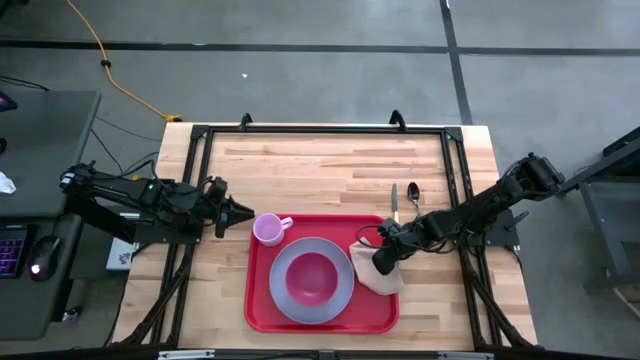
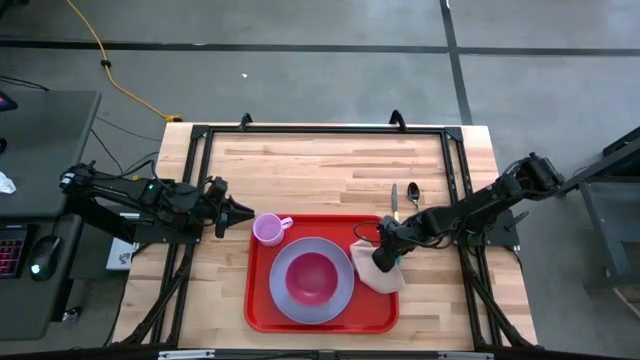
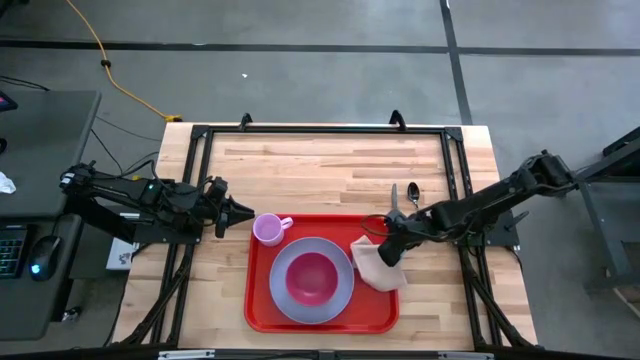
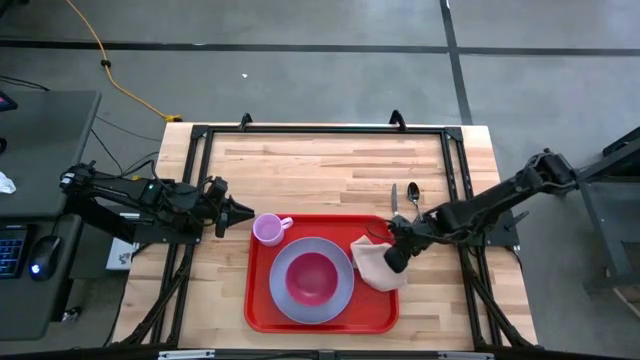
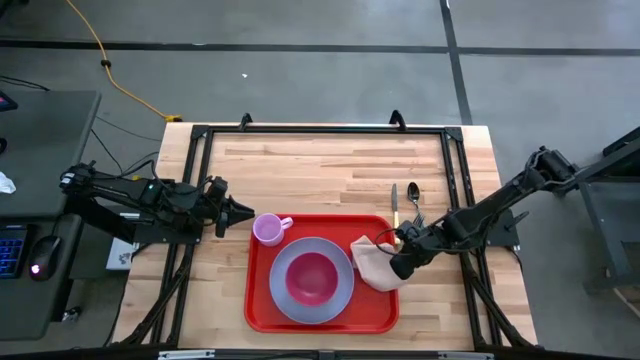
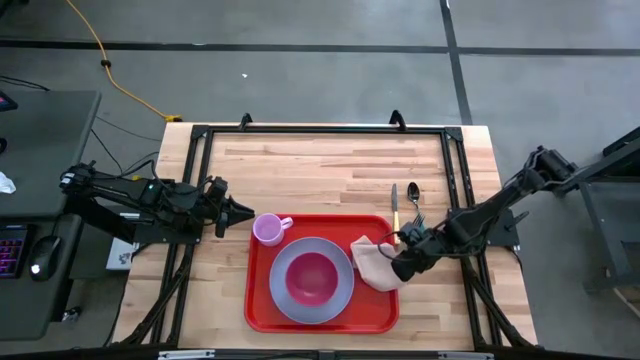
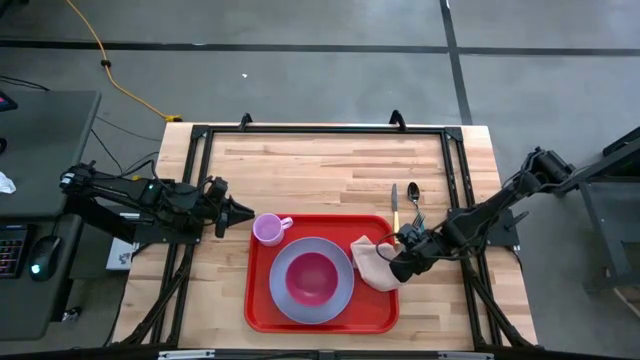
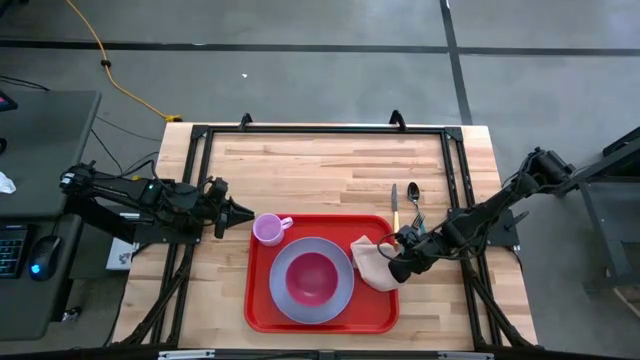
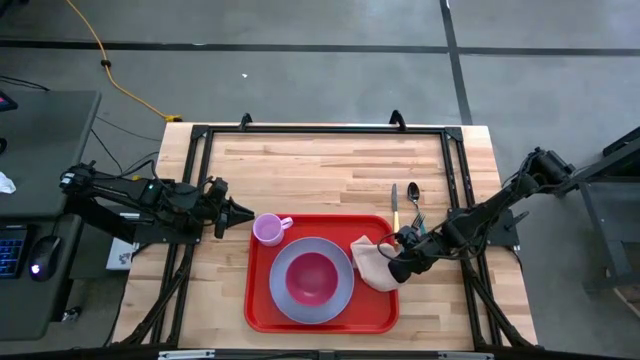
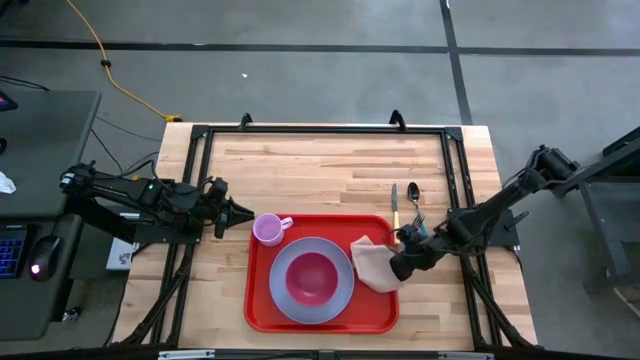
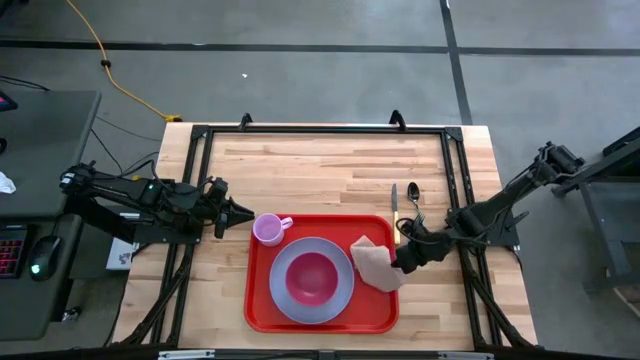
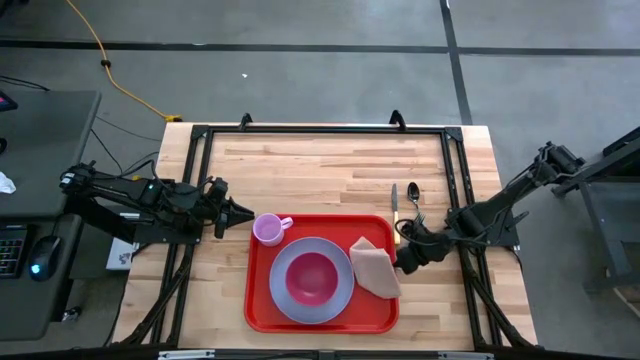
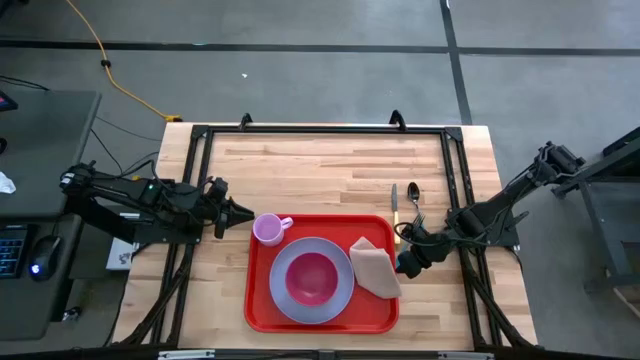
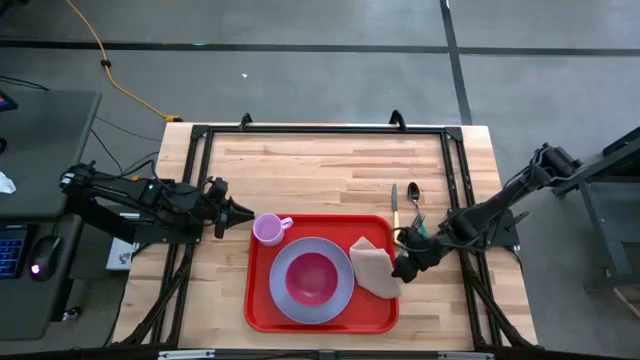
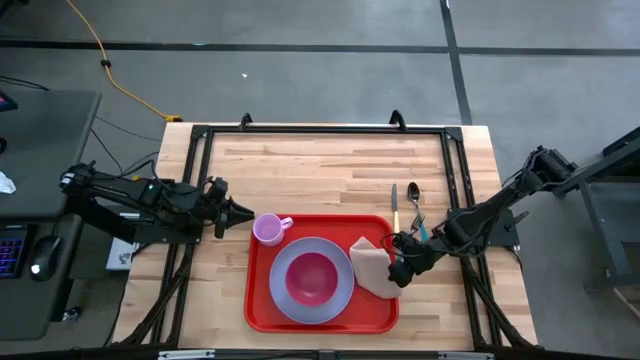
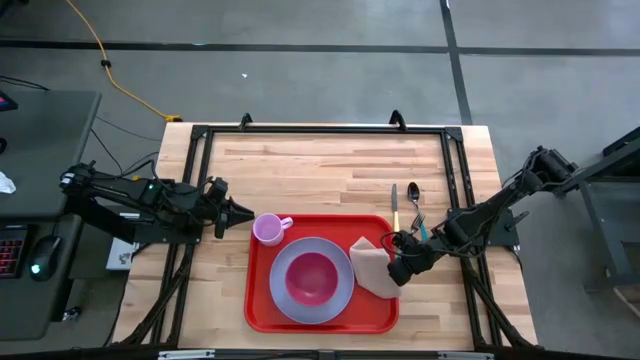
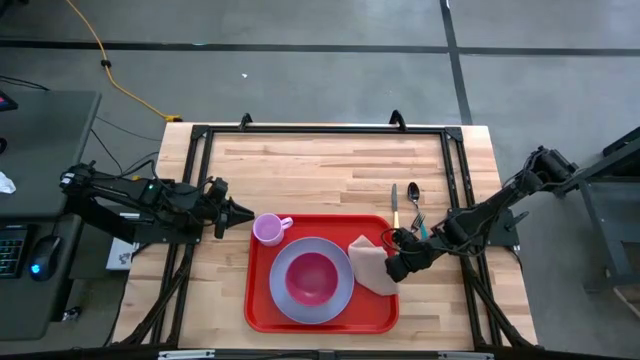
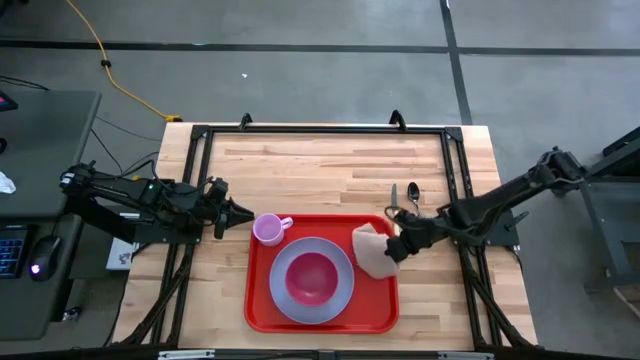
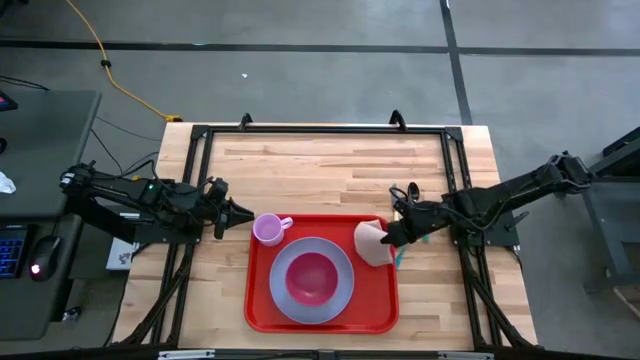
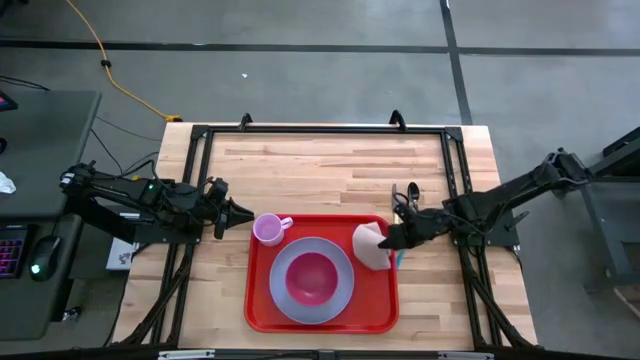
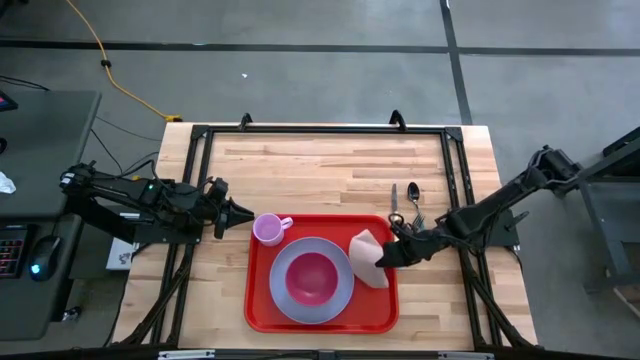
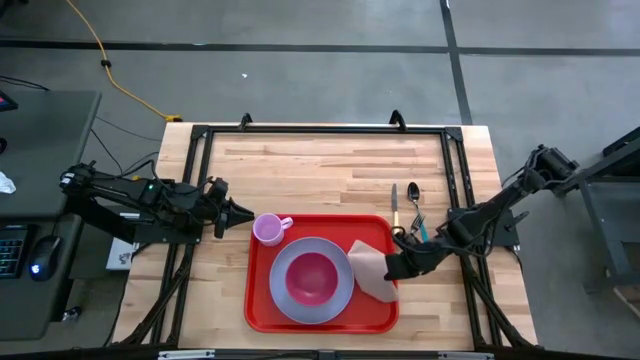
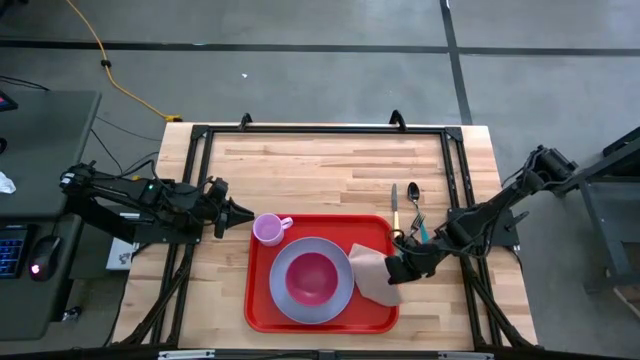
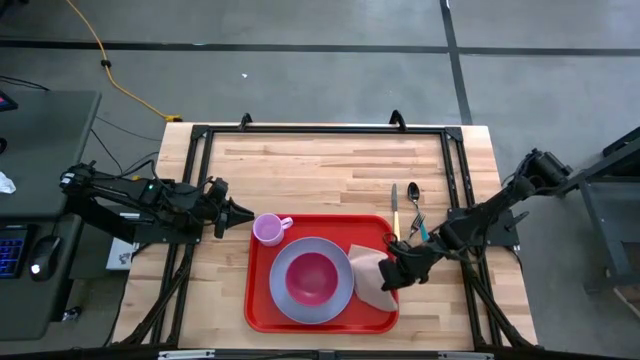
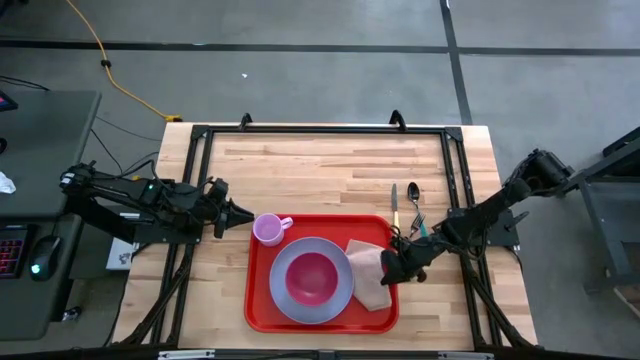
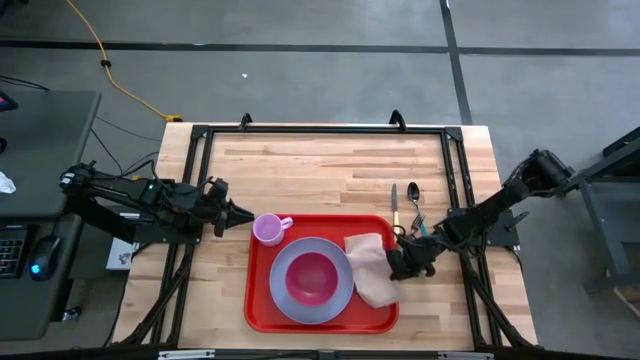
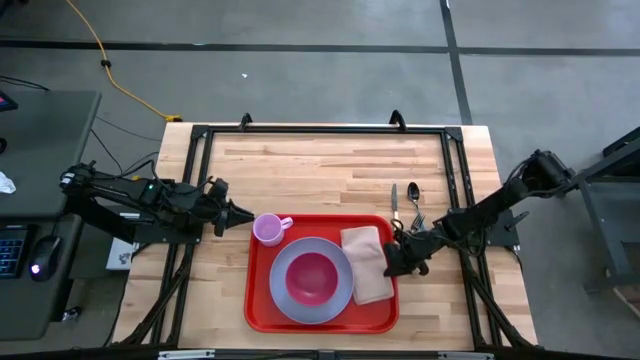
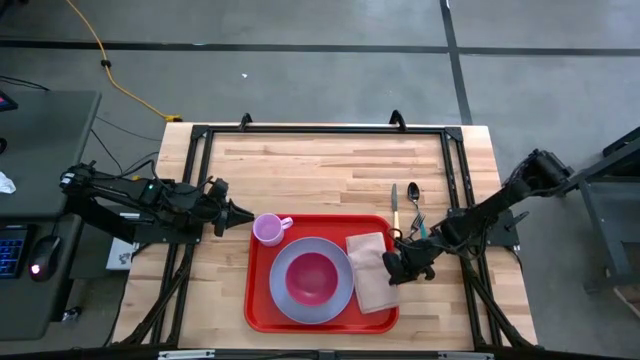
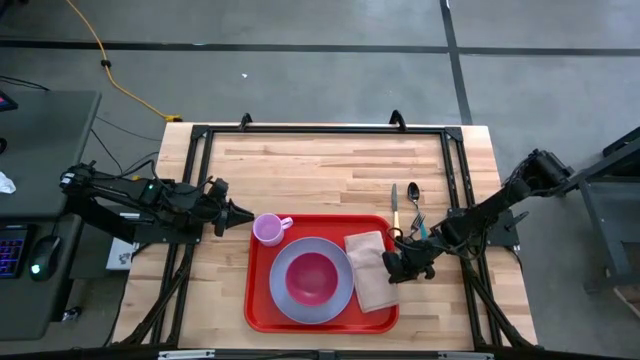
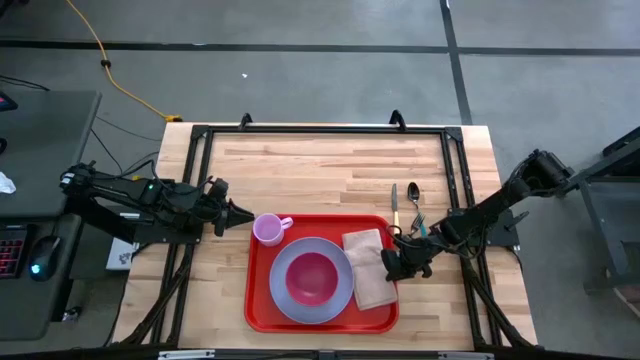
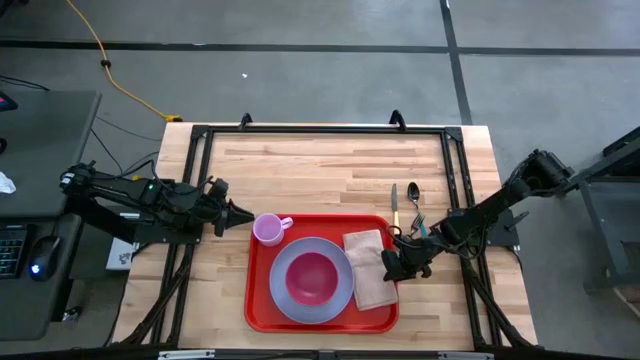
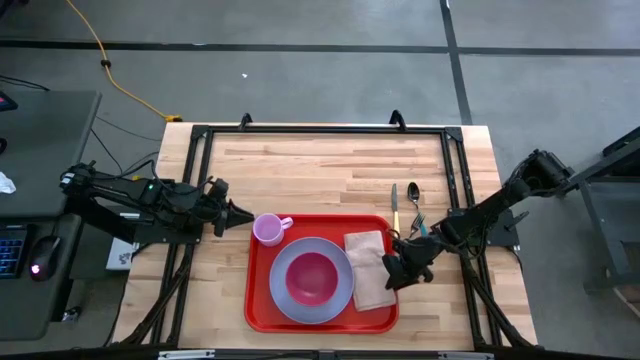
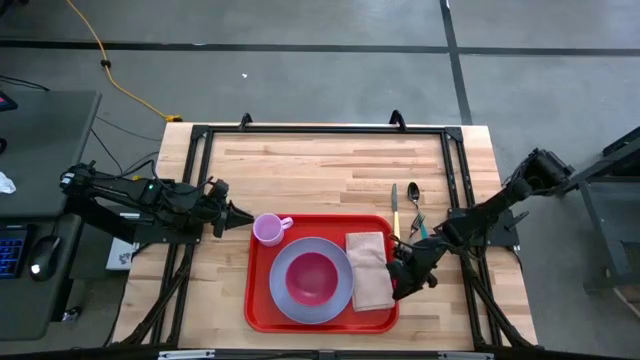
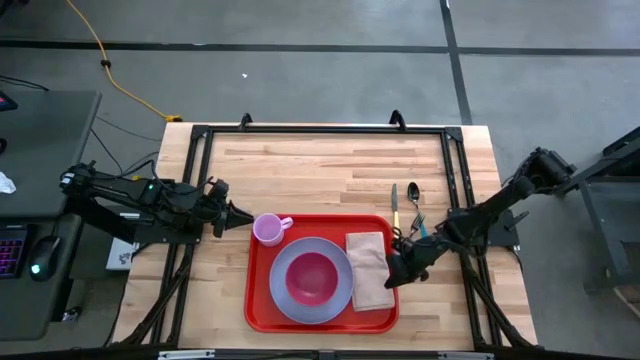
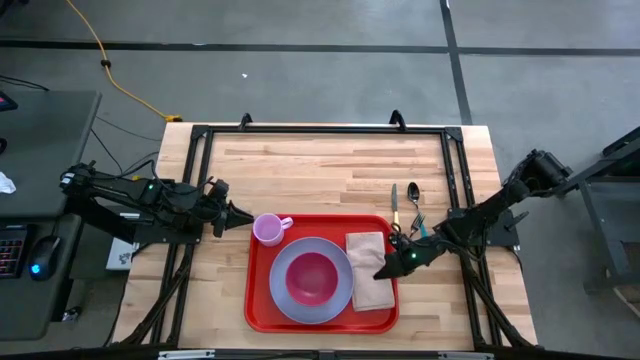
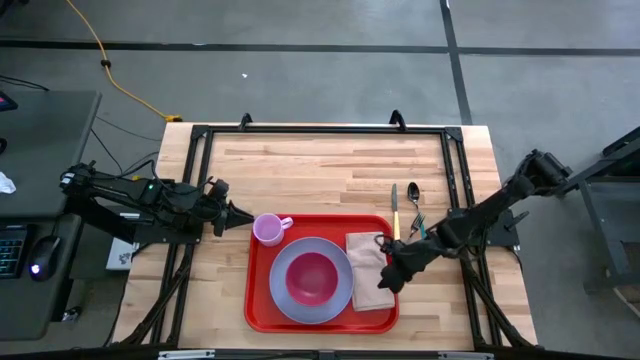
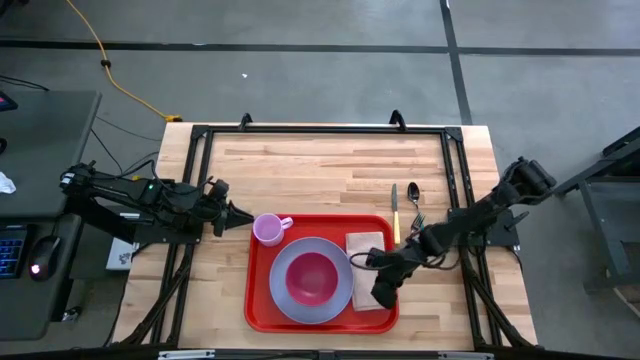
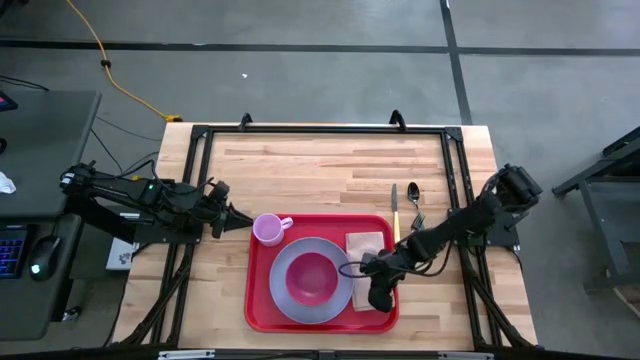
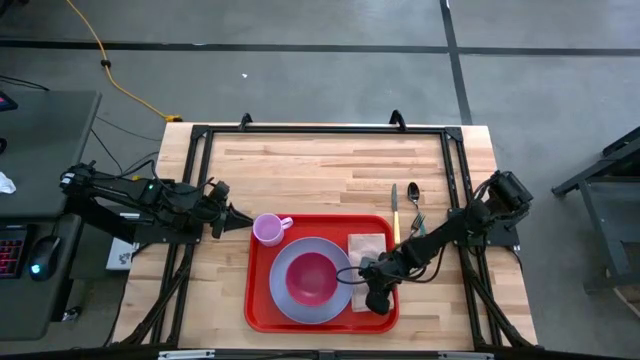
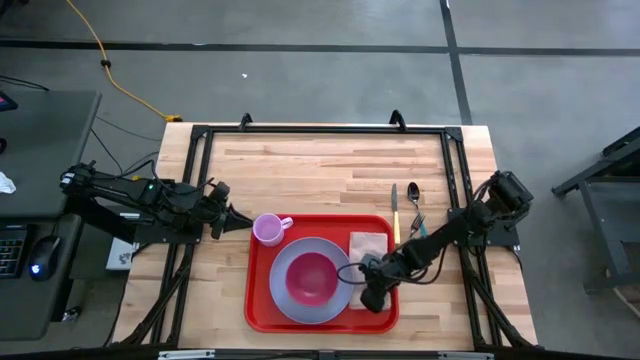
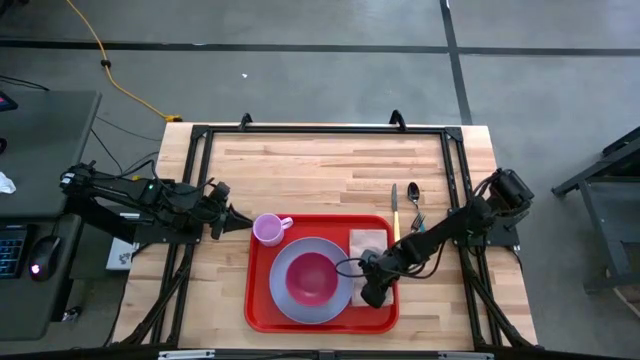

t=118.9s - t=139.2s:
Task: Set up tray
Put the brown table napkin on the red serving tray to the right of the purple plate
